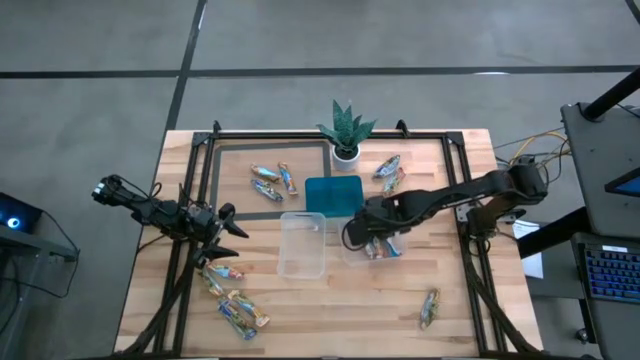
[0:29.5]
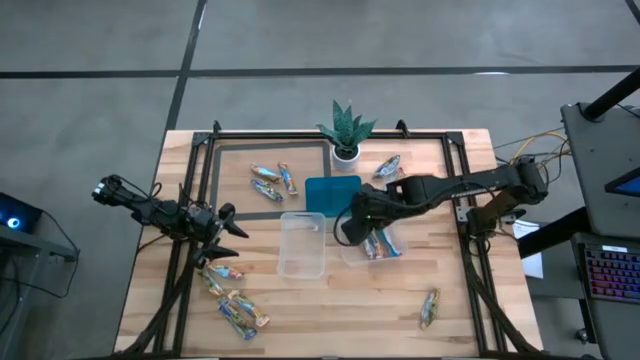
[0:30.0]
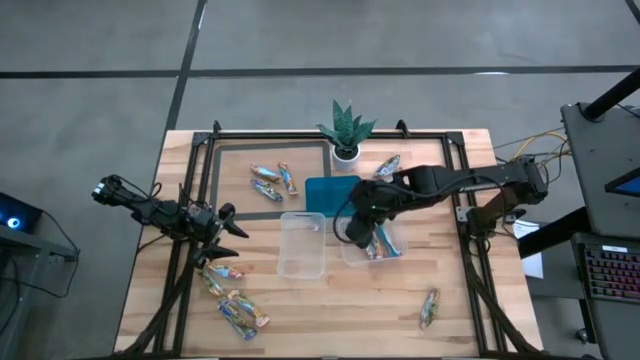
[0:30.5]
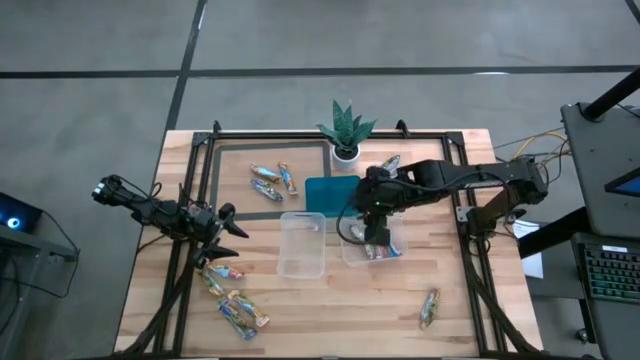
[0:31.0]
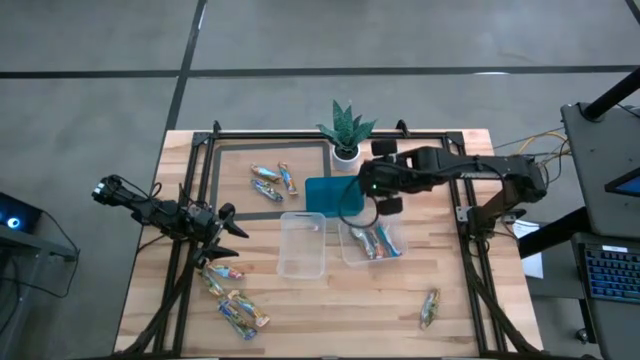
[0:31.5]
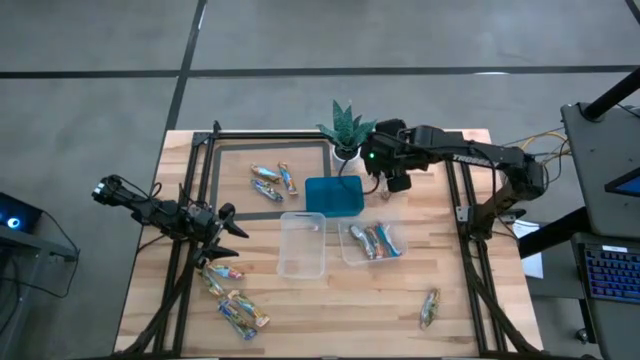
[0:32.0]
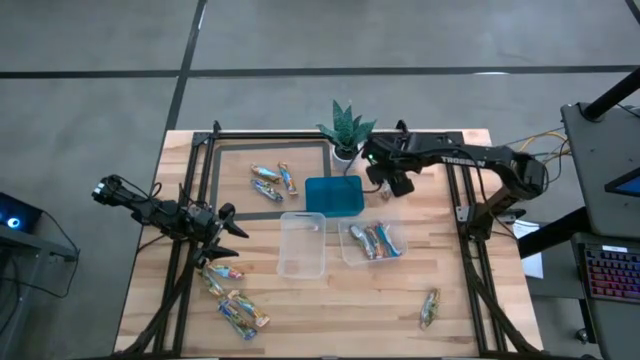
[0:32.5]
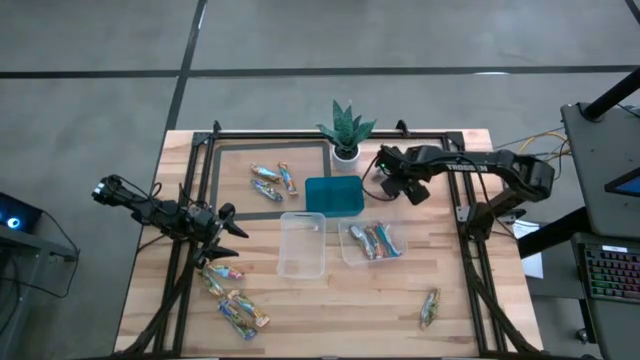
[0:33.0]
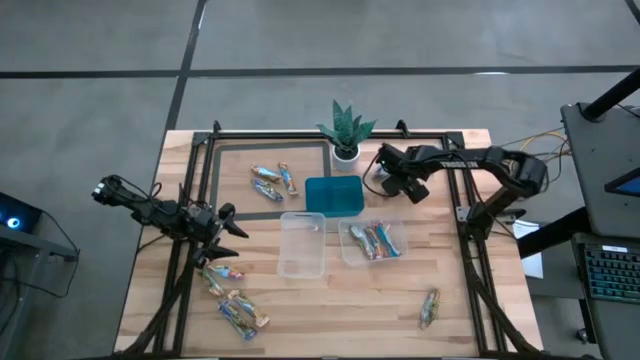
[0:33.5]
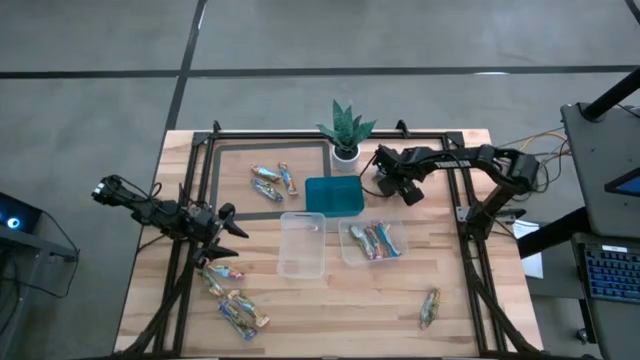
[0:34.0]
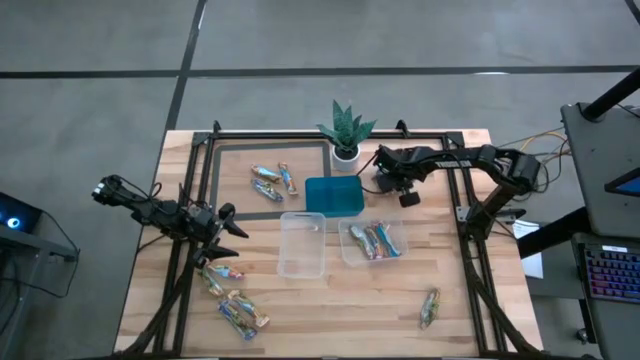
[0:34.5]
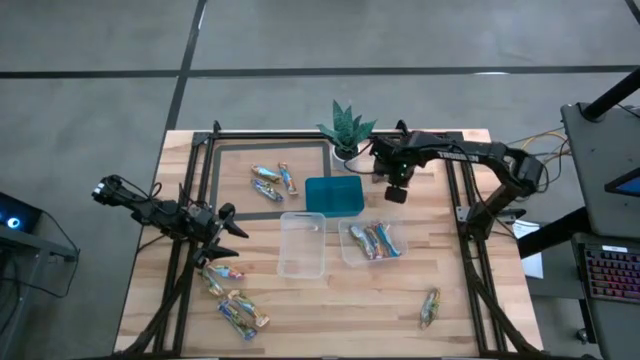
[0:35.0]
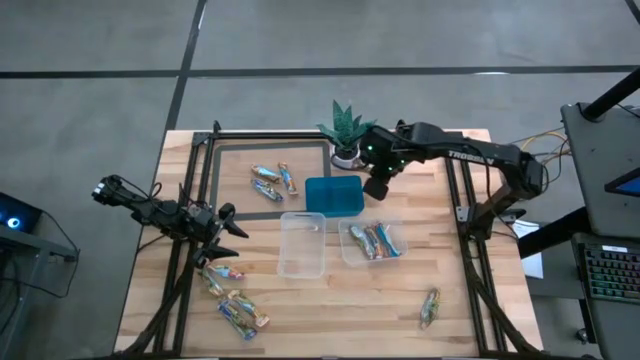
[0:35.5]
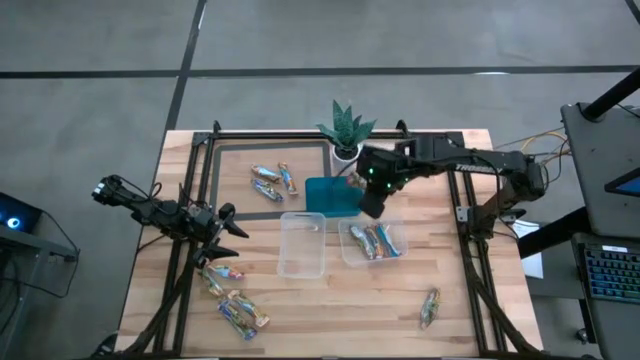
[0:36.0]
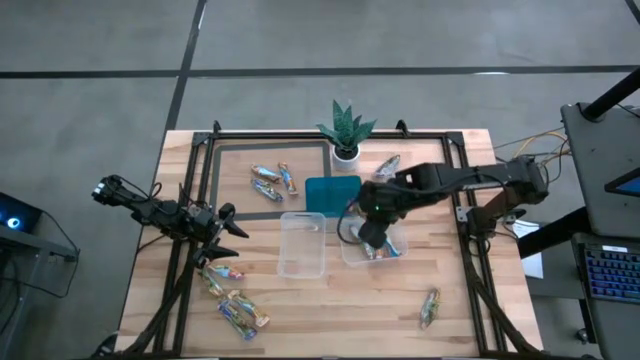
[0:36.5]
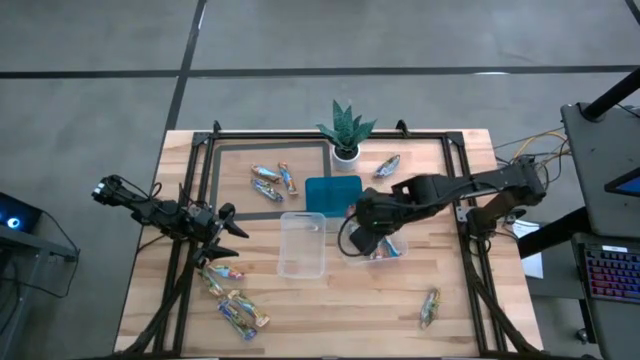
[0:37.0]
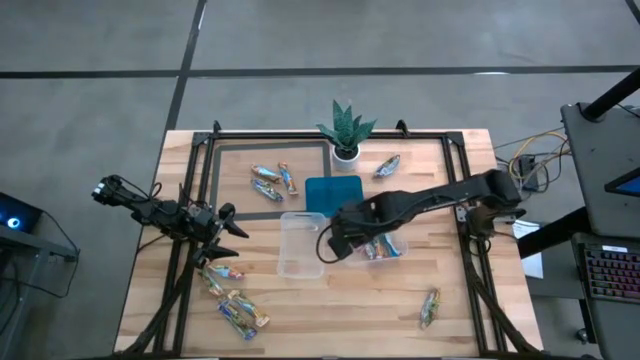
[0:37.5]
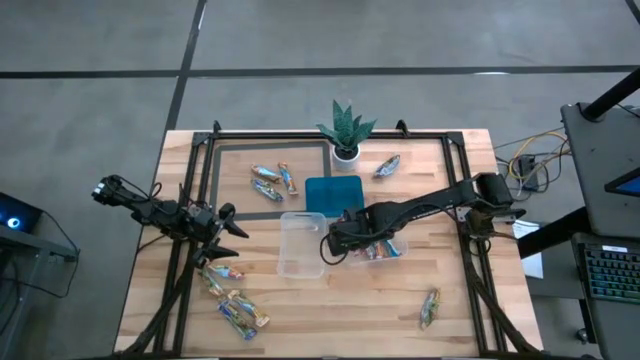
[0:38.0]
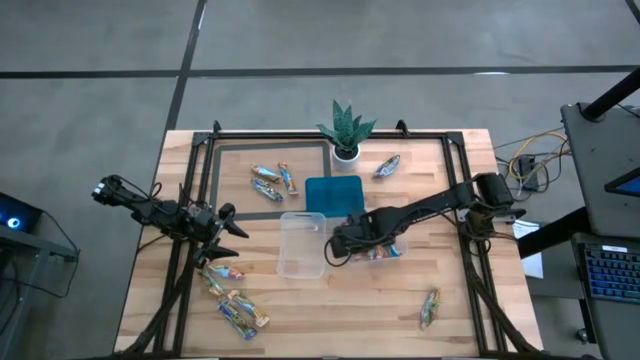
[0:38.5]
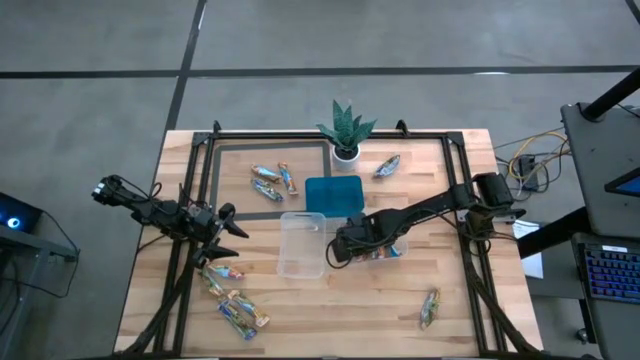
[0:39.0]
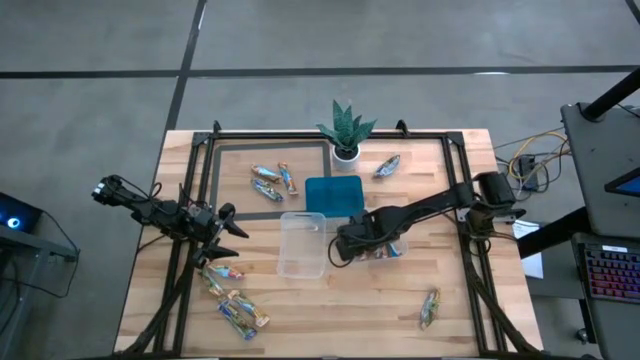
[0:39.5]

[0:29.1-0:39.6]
Task: Pick and place Granola Bars by type
Put the red granola bar into the right transparent bin

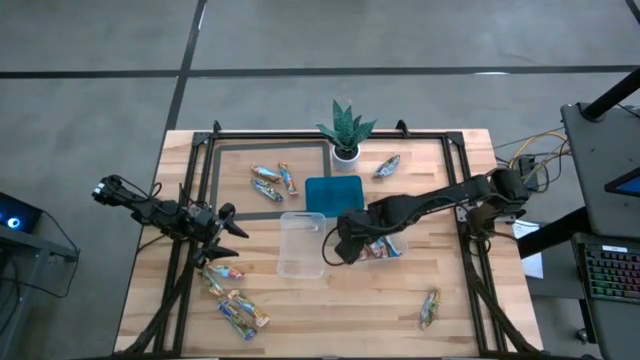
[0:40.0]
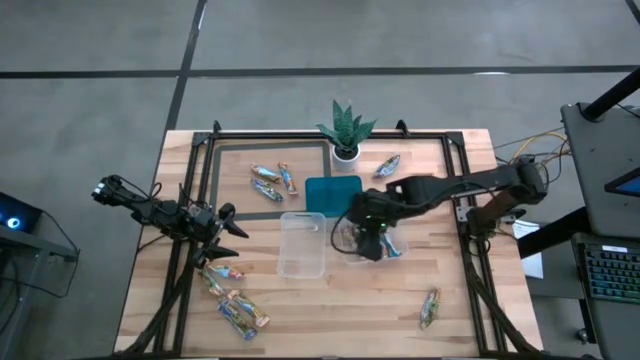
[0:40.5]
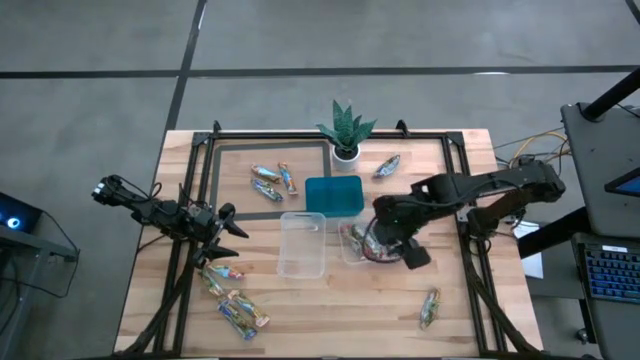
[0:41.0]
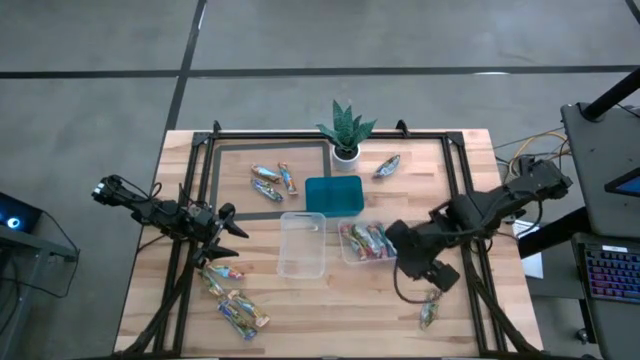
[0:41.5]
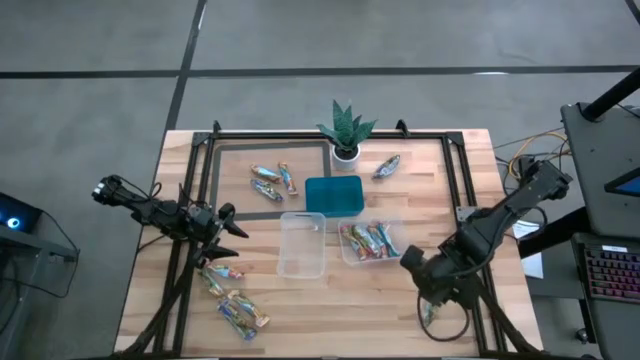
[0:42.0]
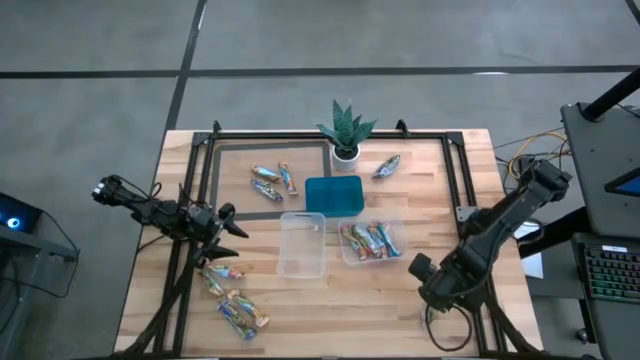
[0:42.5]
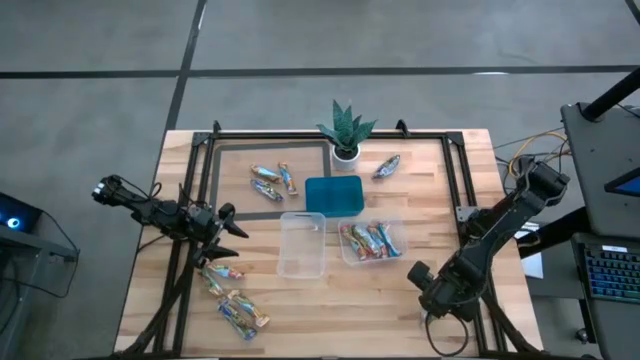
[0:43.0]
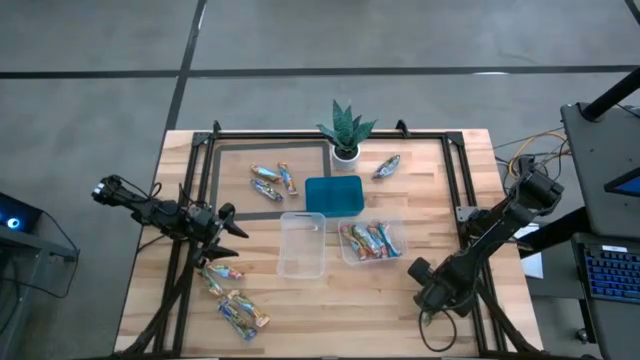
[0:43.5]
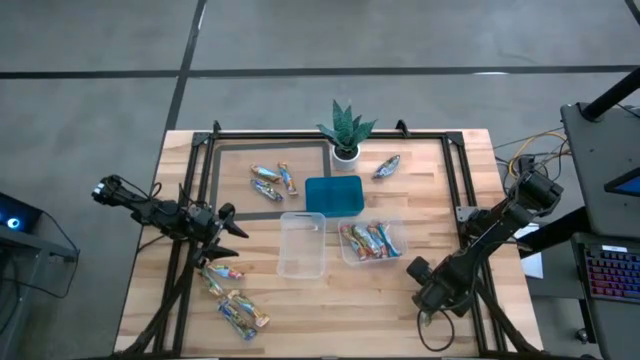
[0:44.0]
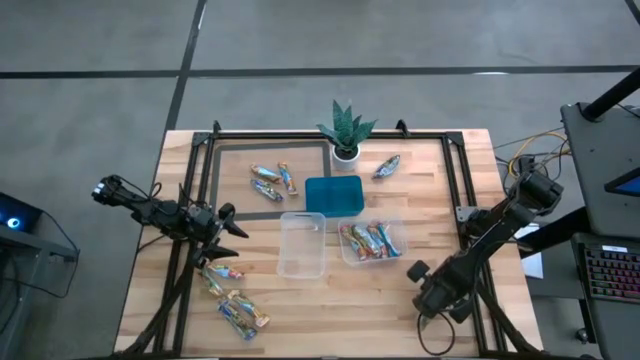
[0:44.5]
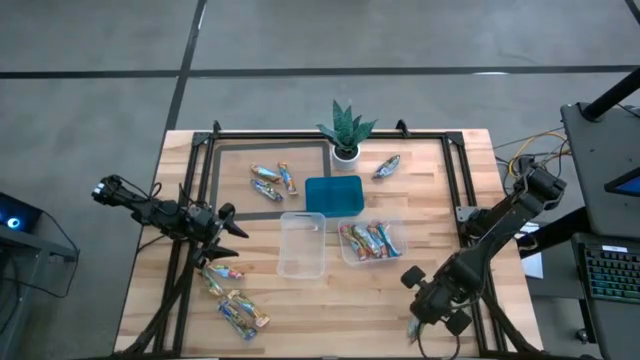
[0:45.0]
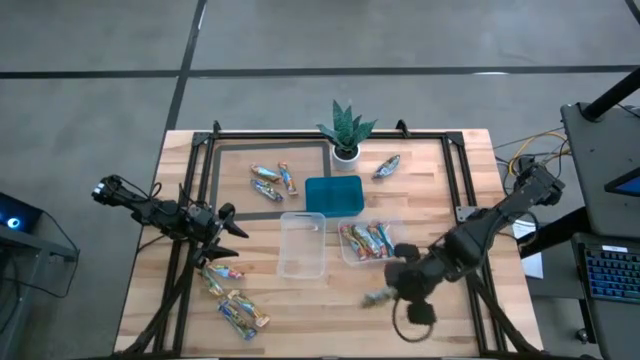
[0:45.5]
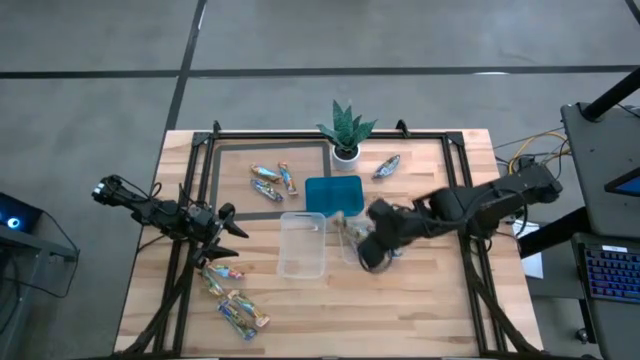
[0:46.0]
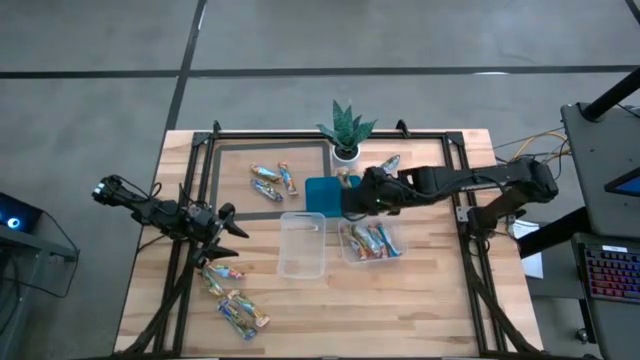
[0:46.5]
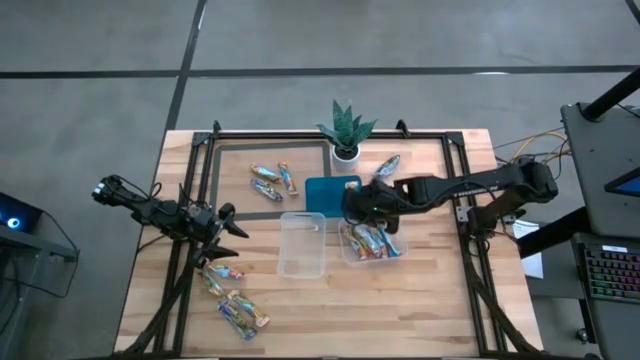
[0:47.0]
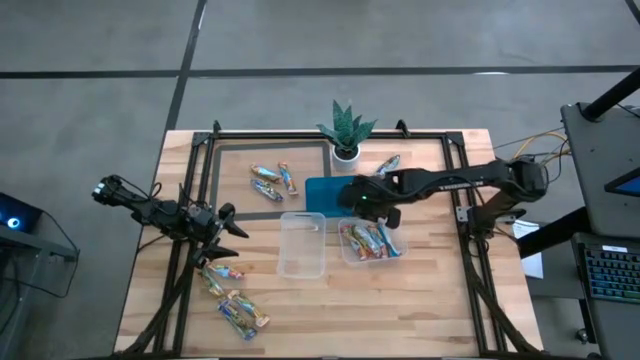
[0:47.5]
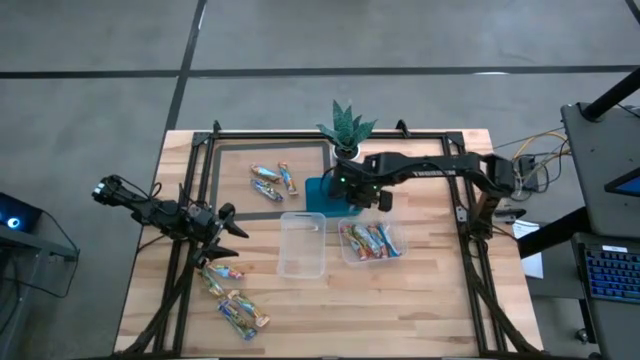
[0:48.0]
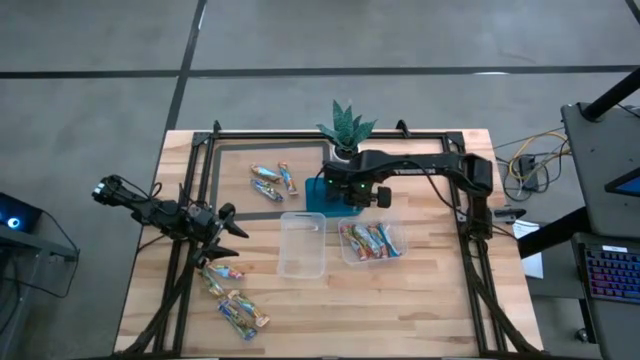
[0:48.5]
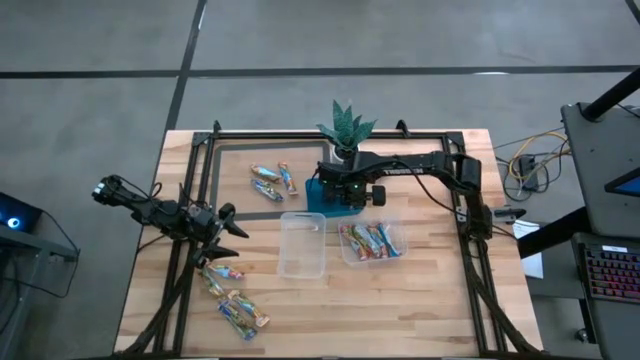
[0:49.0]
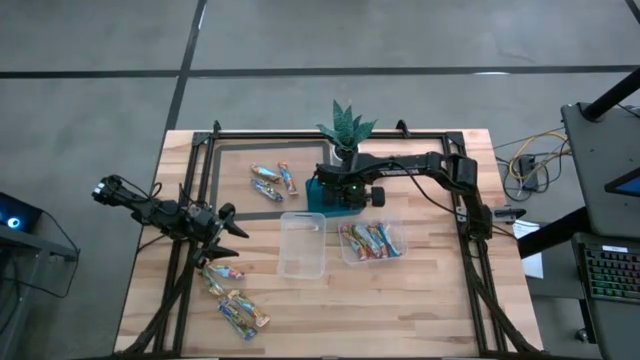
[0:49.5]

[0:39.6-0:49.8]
Put the yellow granola bar into the blue bin

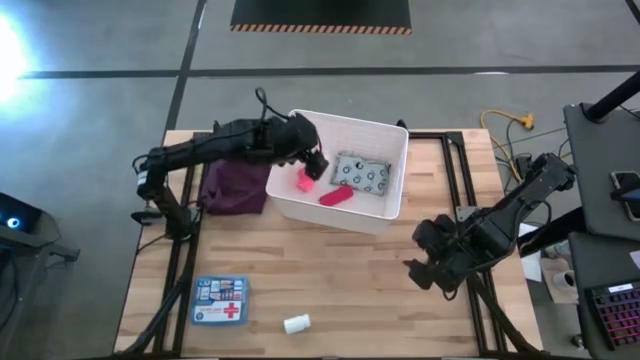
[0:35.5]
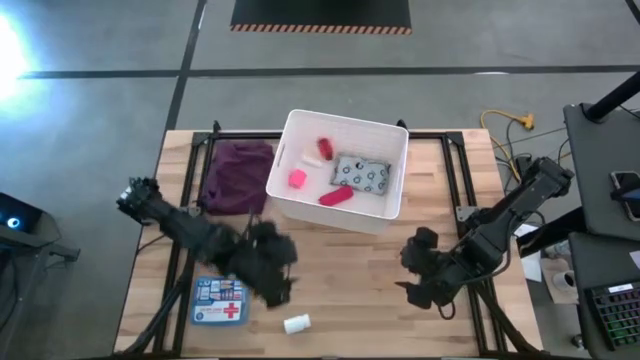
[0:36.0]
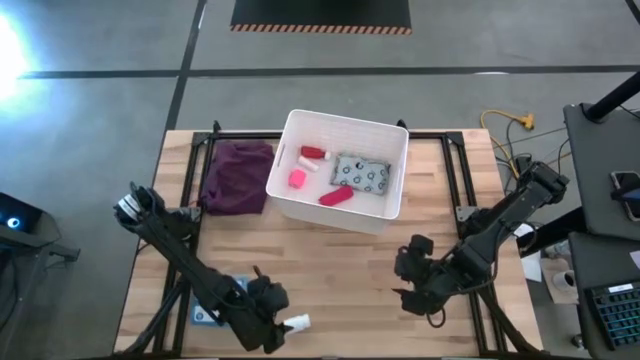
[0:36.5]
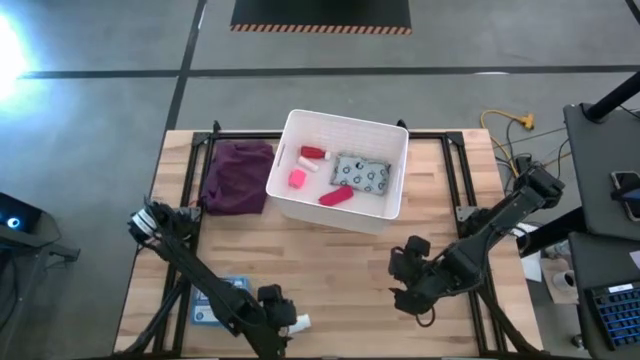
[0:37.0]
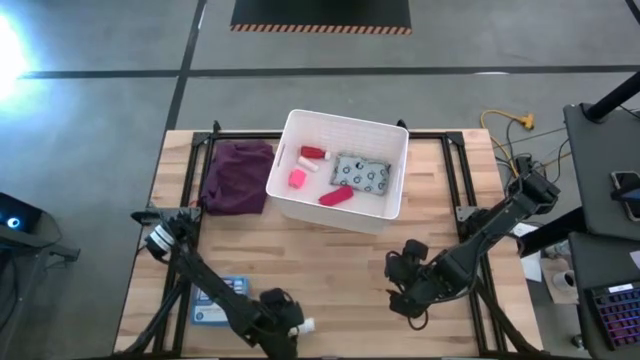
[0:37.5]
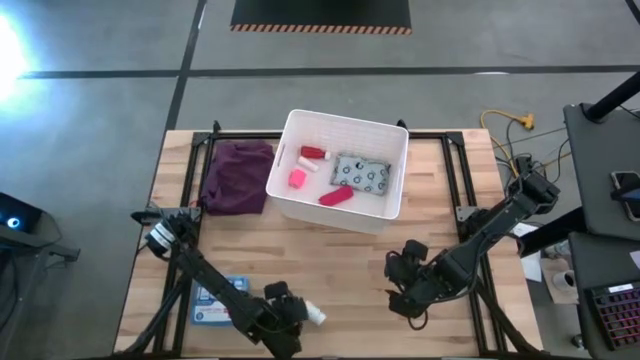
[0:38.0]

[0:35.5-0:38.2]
Task: Pick & place medical supplies in basket/bin
Put the white pill bottle into the white bin
